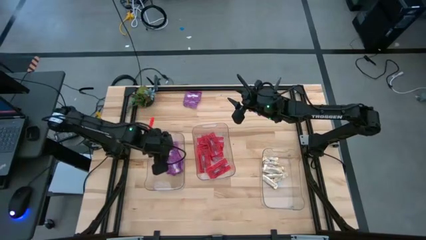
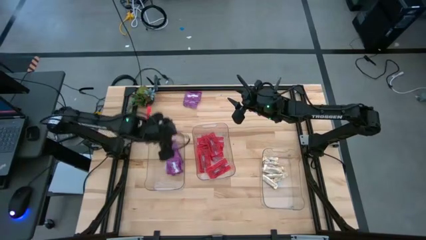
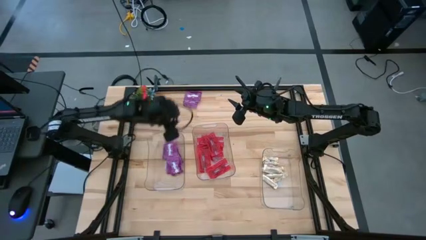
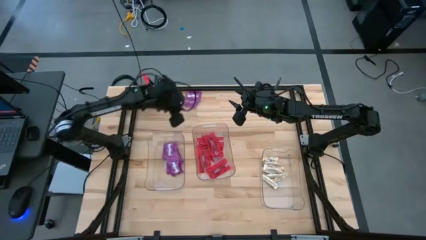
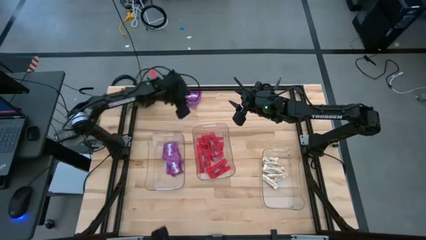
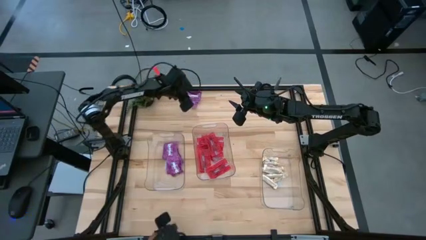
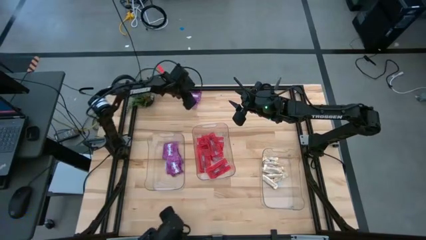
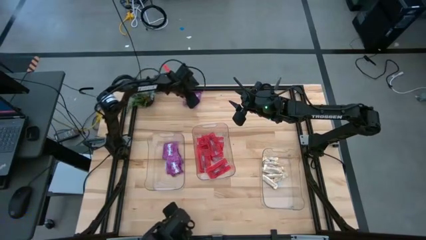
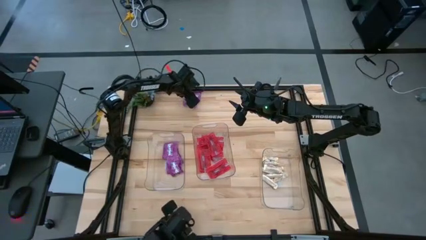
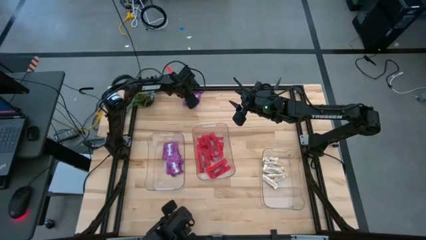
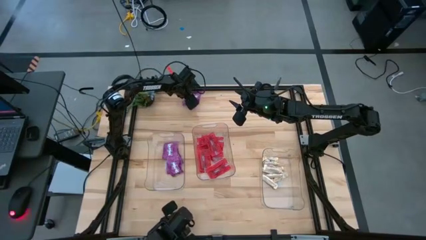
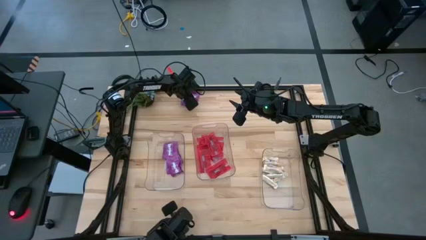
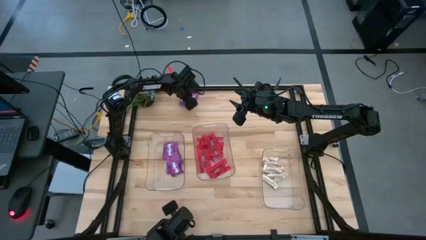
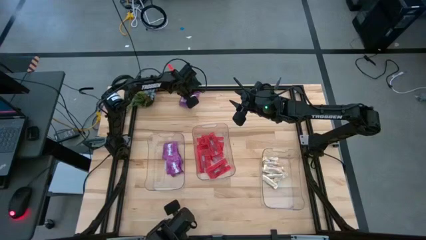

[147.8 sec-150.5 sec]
Task: Sort candy
Put the violet candy pack into the left transparent bin

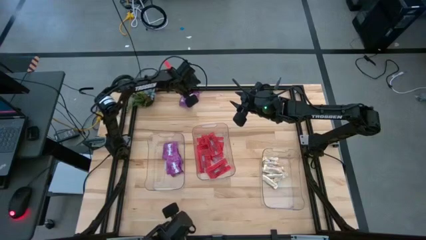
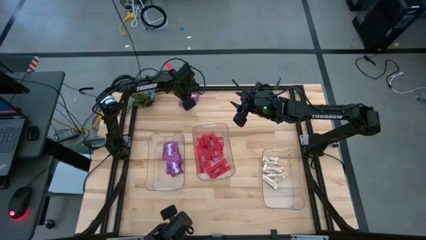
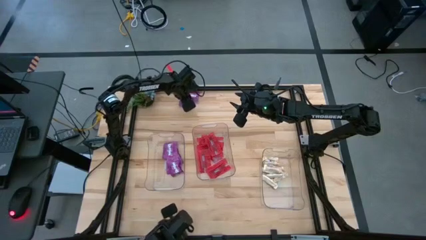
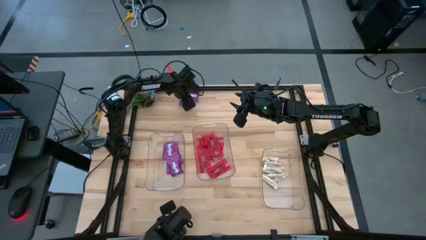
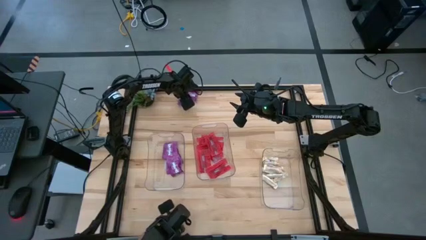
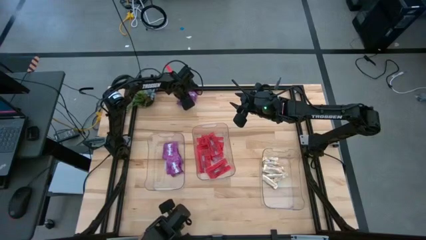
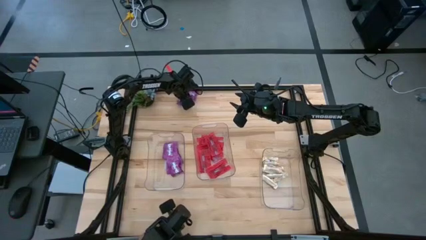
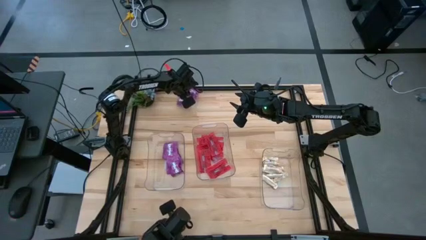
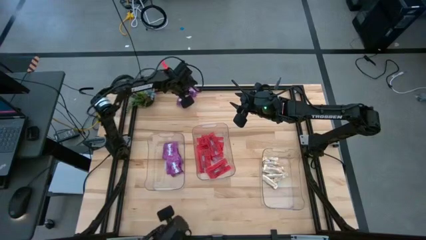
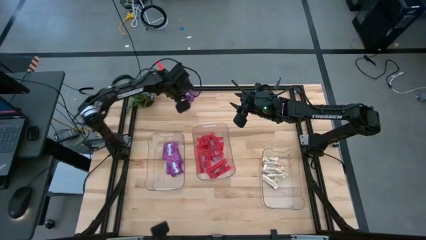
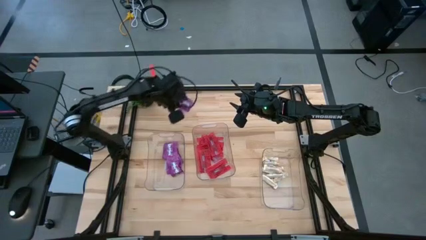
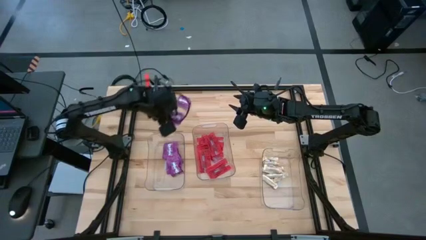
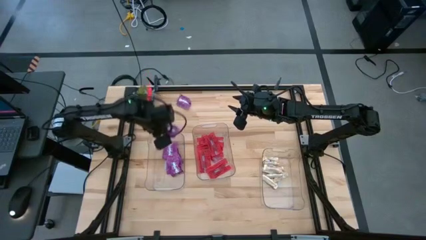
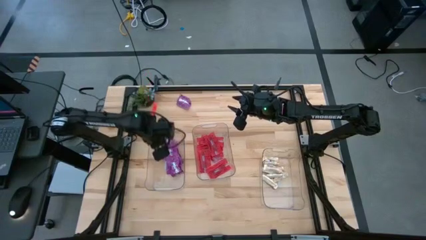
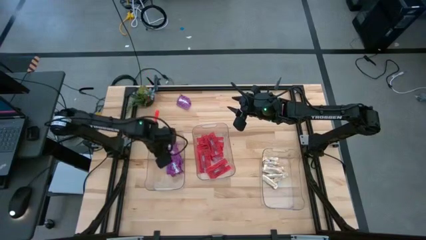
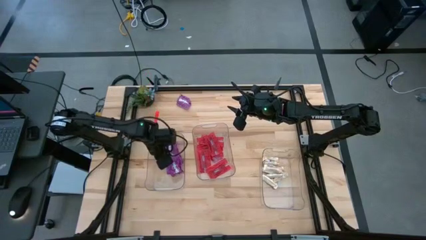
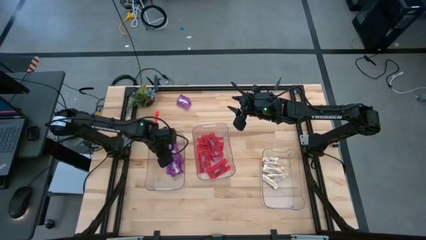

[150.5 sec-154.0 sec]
Put the violet candy pack into the left transparent bin

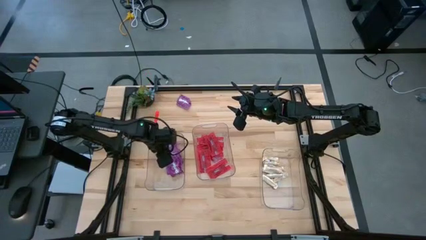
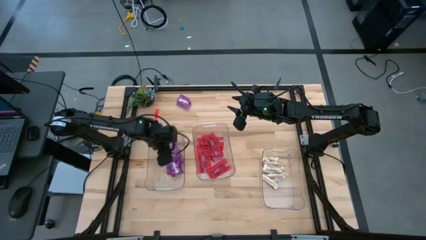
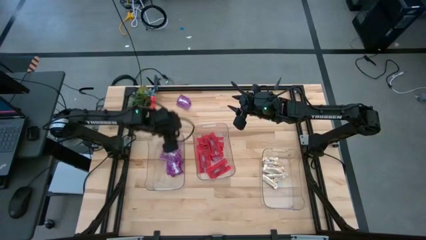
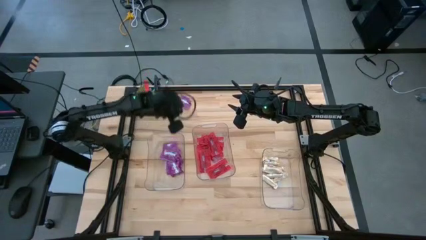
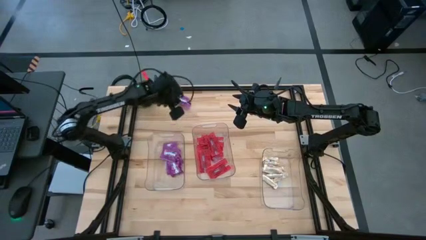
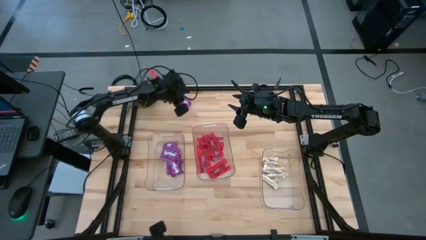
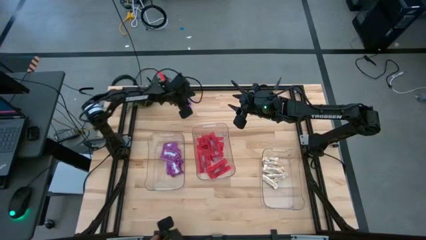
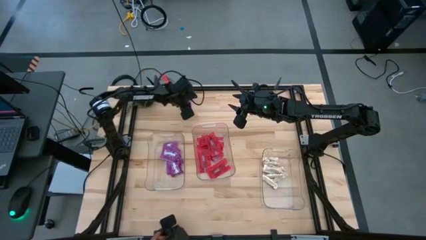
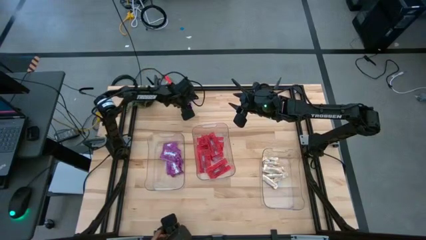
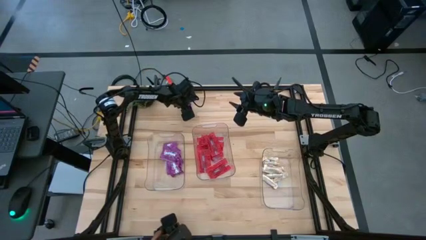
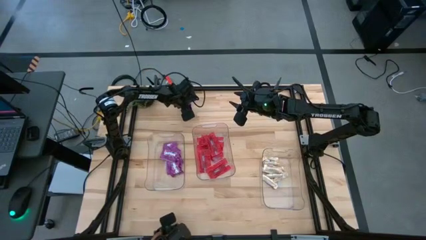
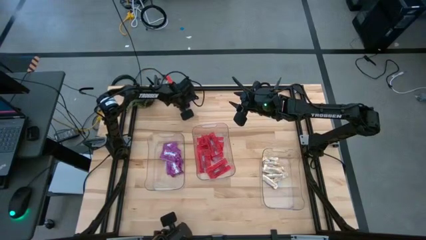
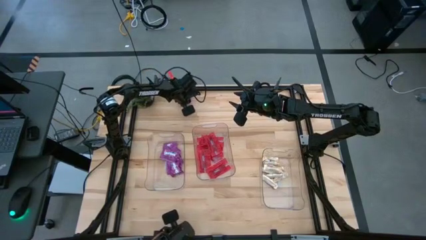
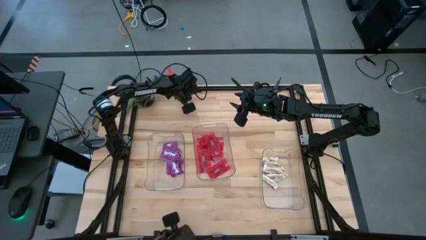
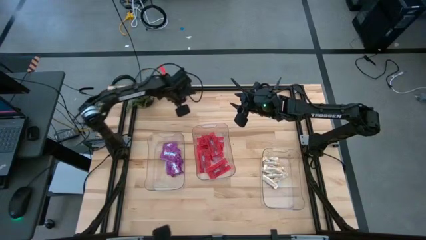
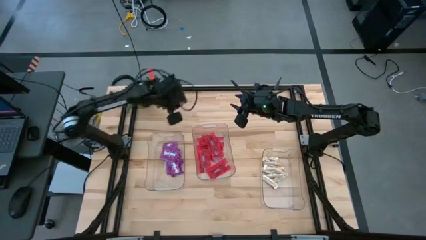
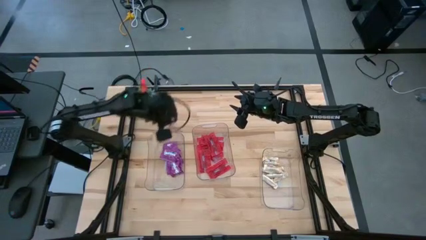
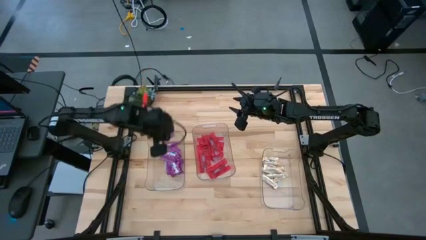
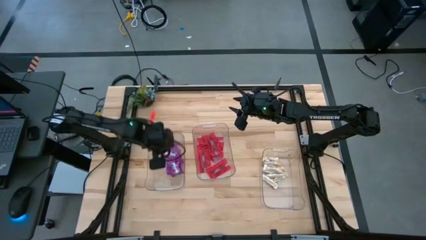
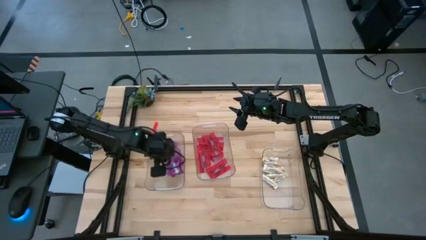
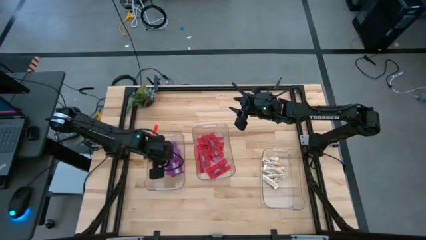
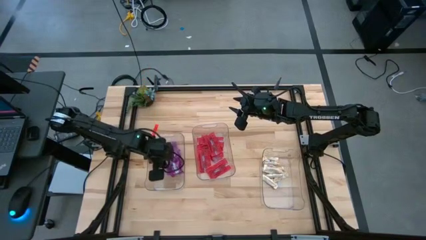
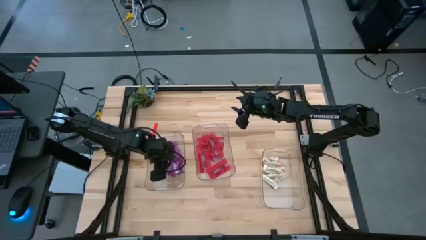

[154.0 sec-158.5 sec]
Put the violet candy pack into the left transparent bin

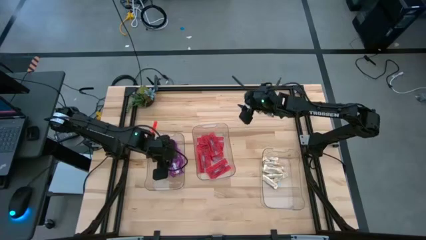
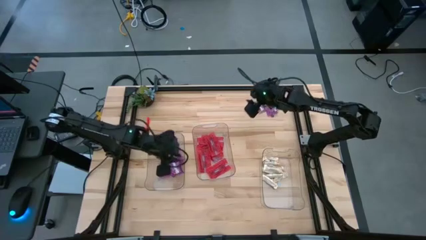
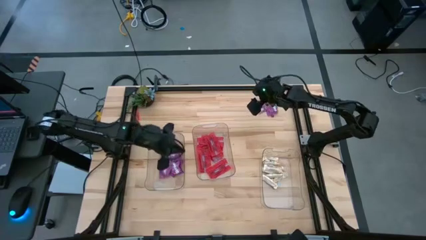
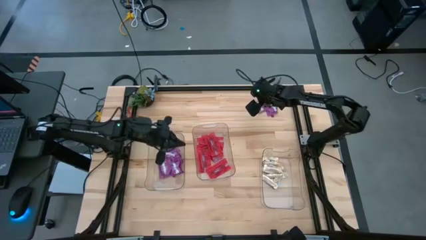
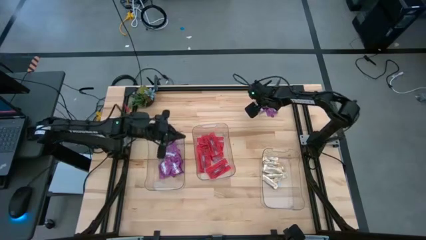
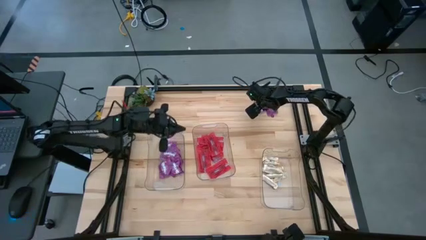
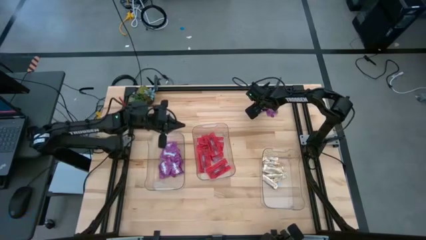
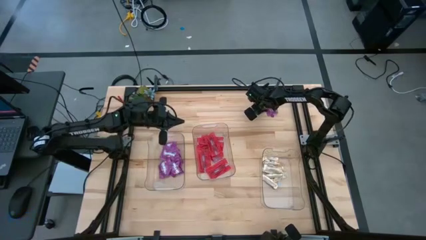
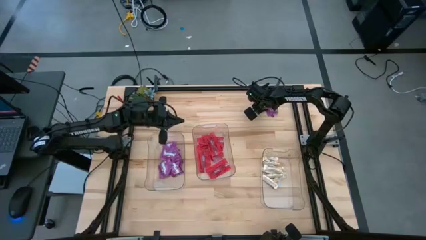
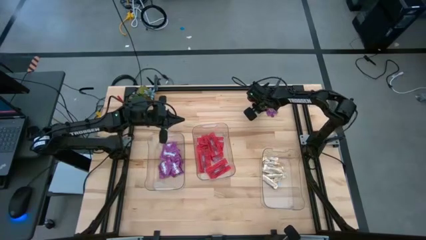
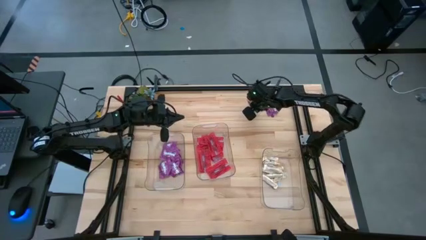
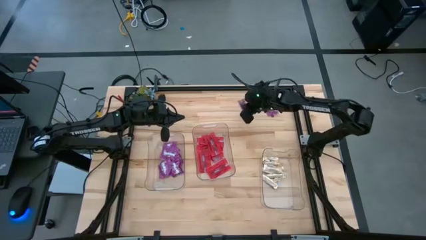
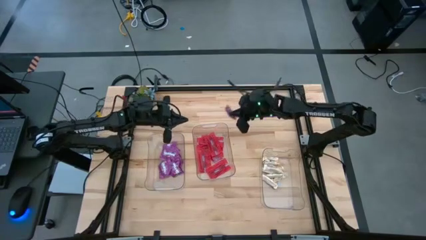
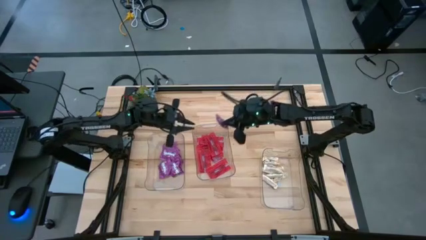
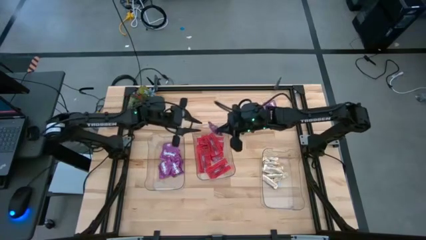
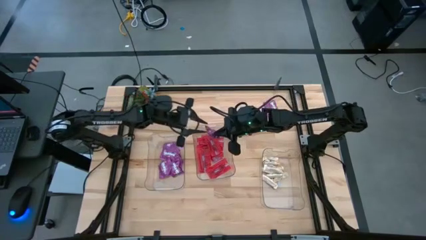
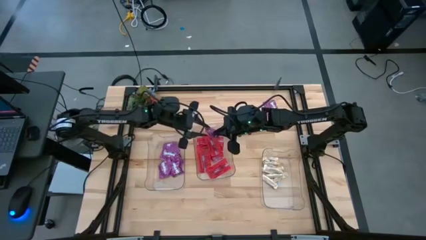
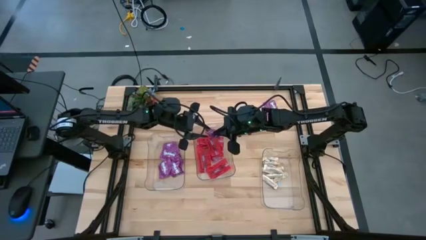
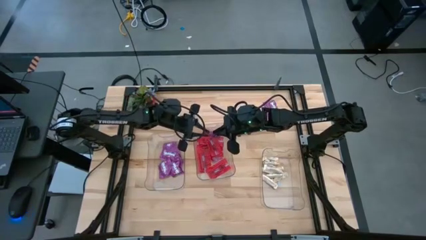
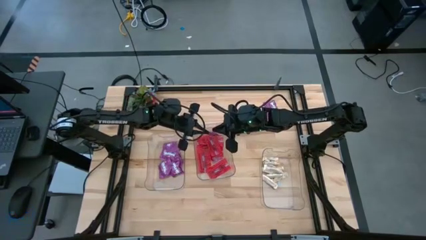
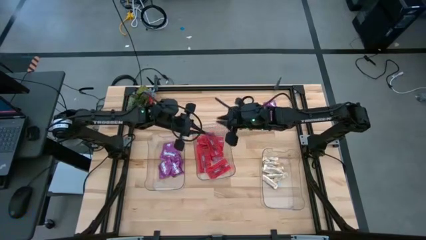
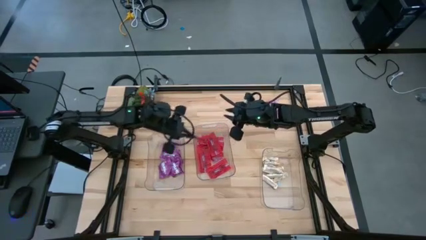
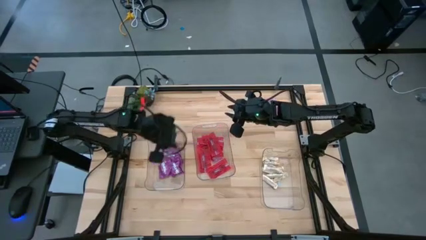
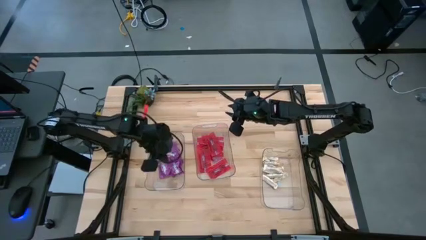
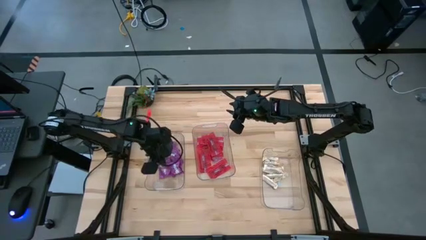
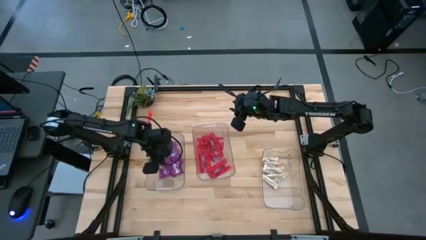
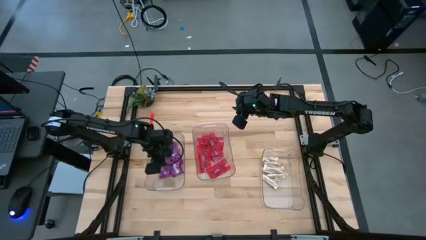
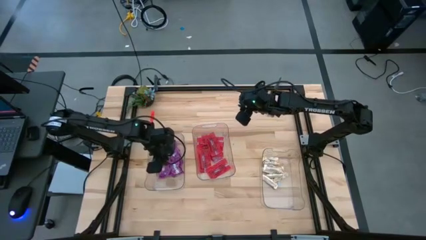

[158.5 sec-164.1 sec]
Put the violet candy pack into the left transparent bin

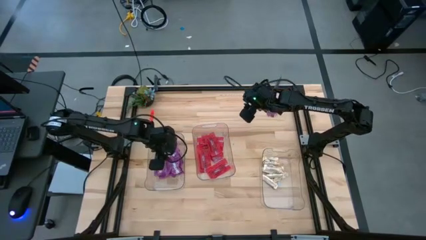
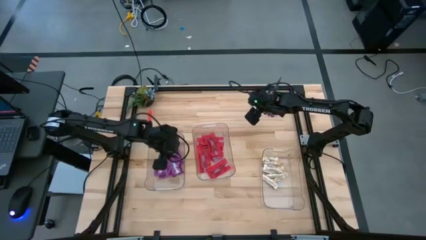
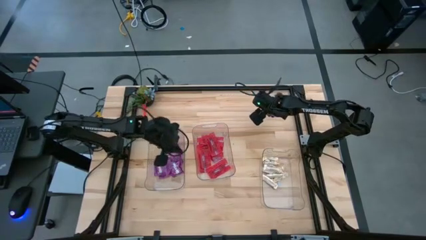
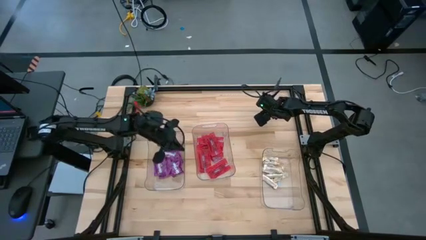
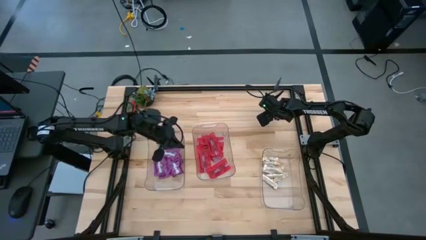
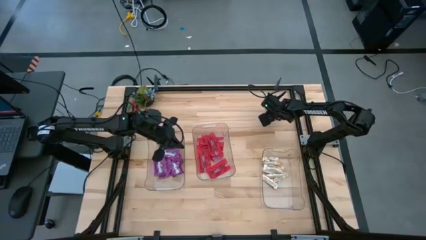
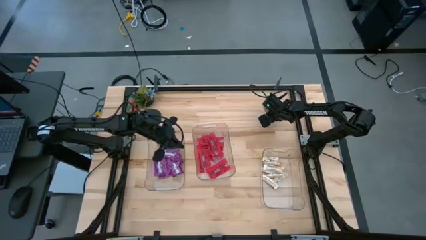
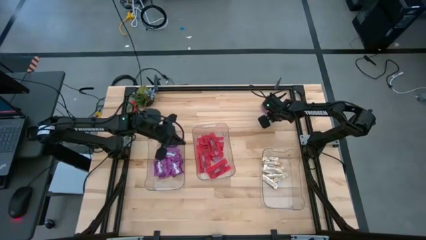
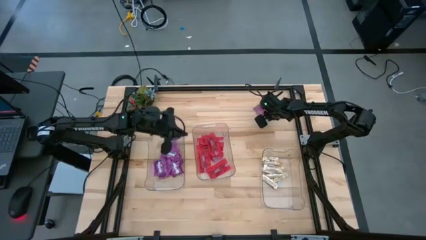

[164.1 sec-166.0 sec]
Put the violet candy pack into the left transparent bin
